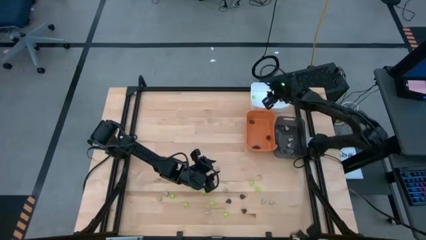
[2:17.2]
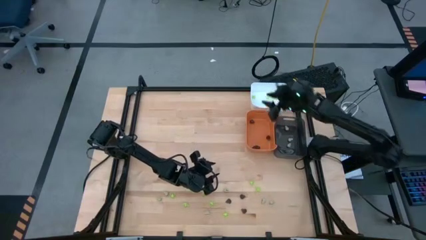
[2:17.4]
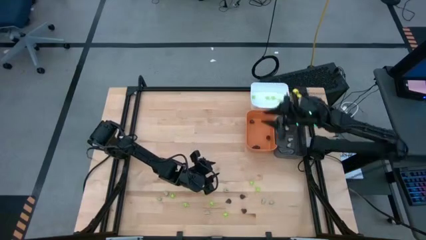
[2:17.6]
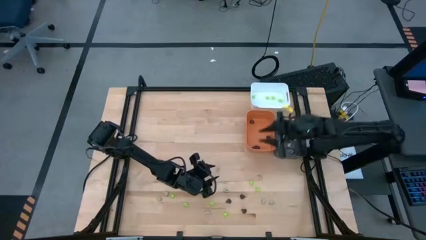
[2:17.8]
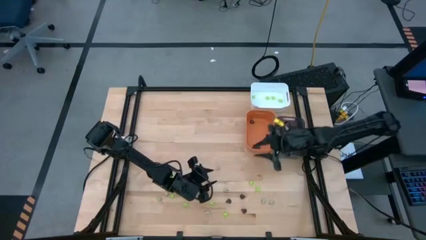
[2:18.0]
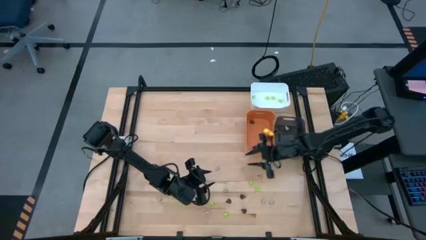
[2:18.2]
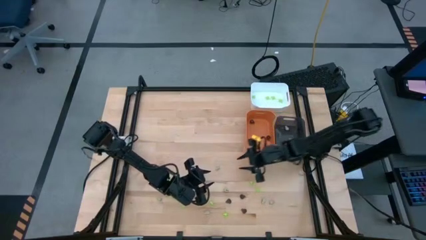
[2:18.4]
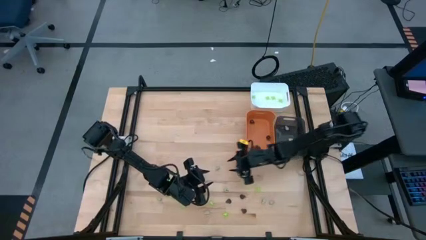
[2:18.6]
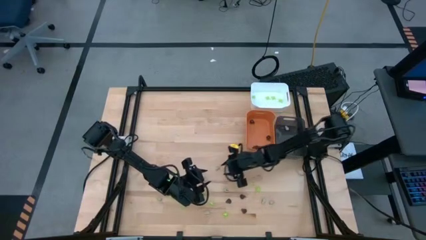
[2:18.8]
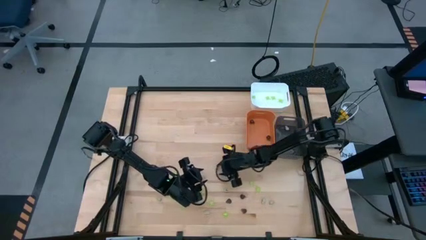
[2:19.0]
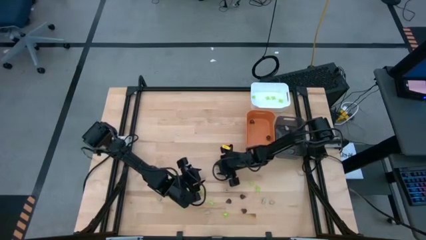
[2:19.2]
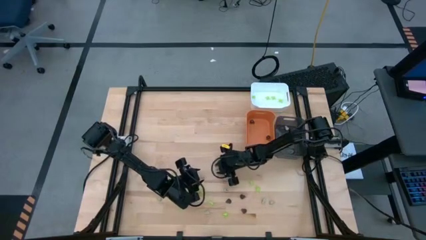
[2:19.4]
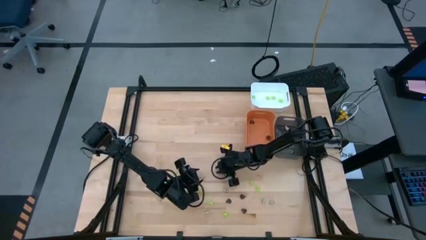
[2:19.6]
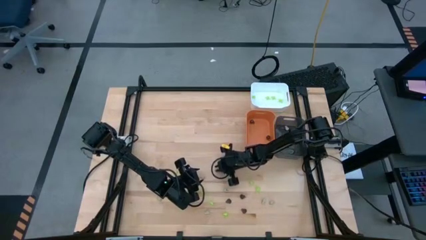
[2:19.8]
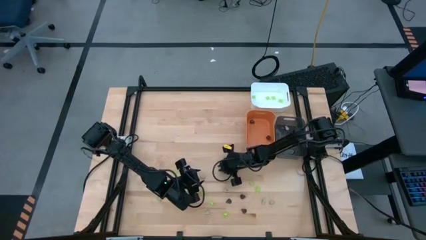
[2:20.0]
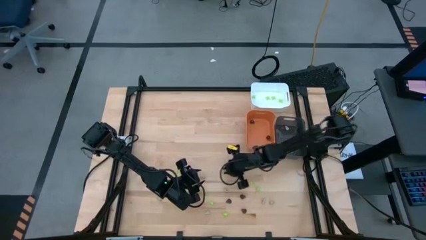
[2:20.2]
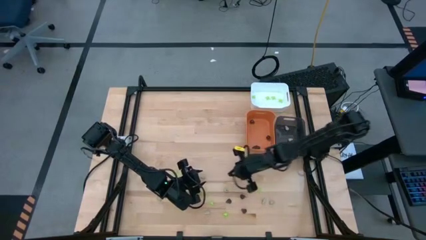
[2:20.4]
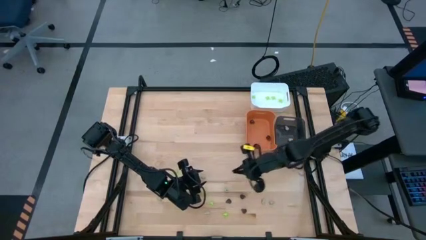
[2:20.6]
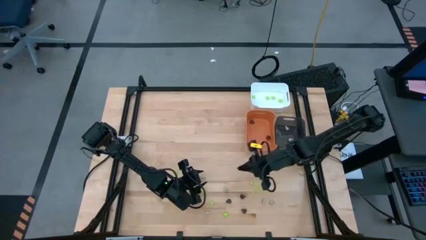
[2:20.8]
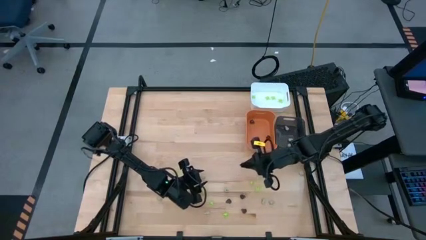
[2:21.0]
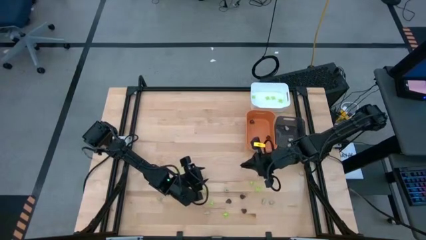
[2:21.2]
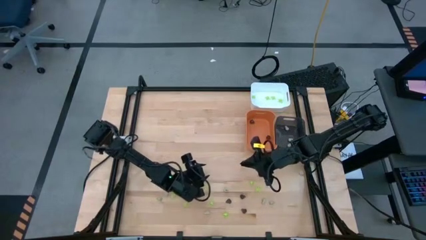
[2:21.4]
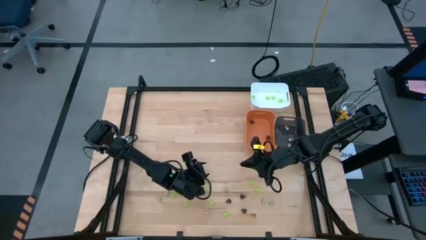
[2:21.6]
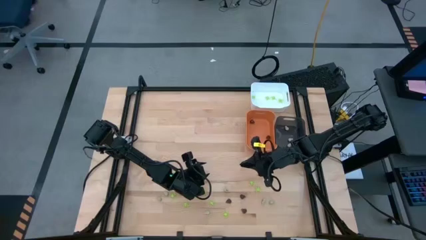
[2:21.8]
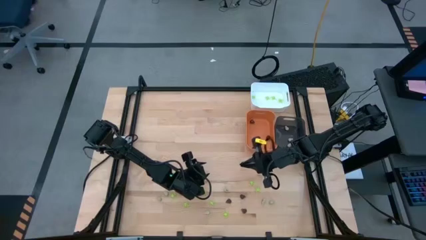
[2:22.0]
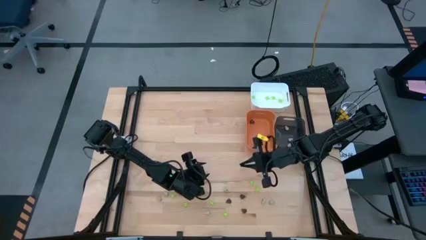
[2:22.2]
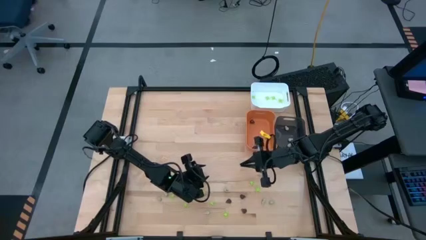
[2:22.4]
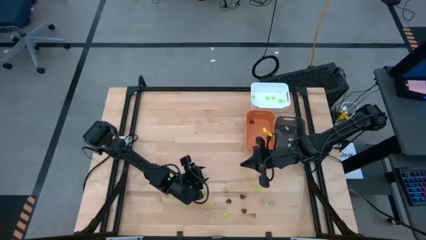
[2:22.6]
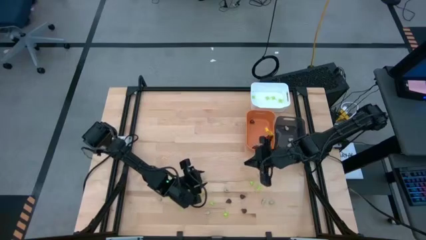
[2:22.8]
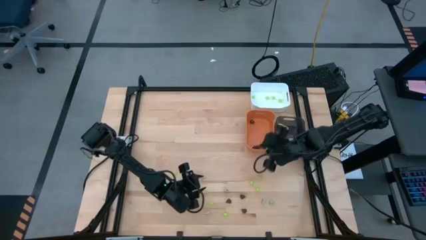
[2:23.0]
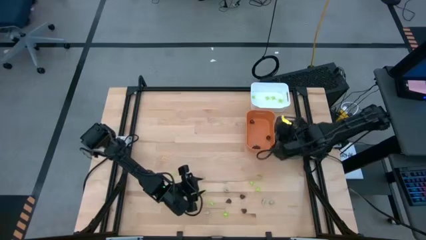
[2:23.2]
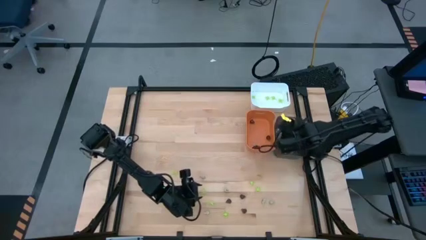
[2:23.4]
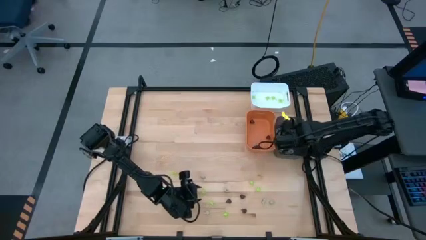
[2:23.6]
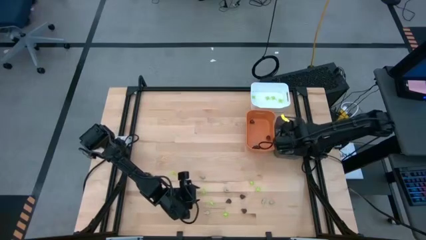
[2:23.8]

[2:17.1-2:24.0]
Task: Sort Halloween decoration
Put the white skull toy into the black bin

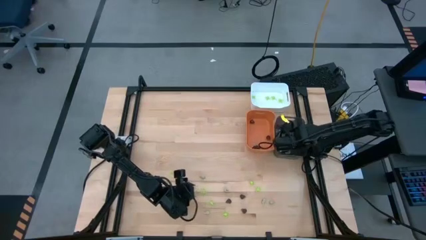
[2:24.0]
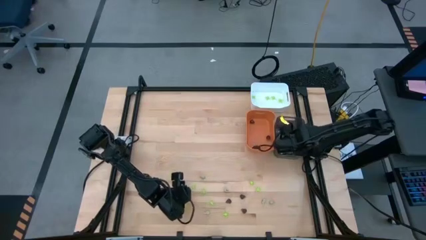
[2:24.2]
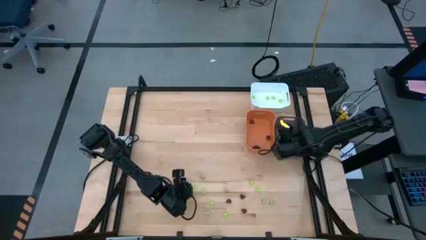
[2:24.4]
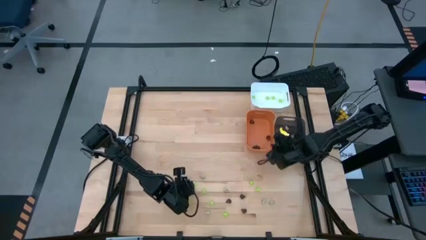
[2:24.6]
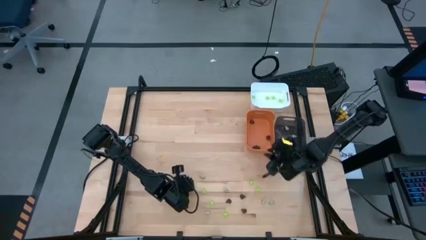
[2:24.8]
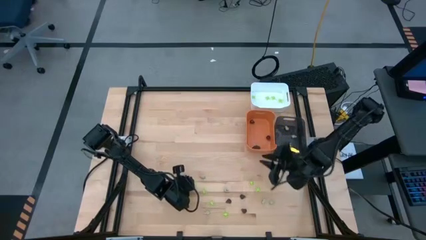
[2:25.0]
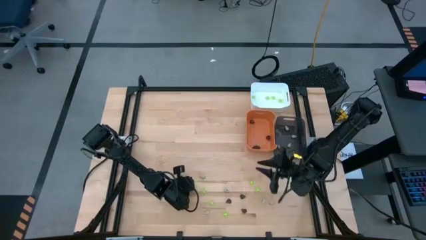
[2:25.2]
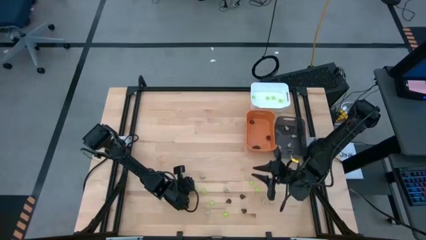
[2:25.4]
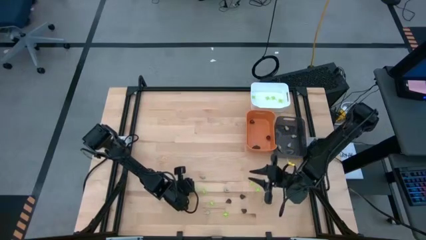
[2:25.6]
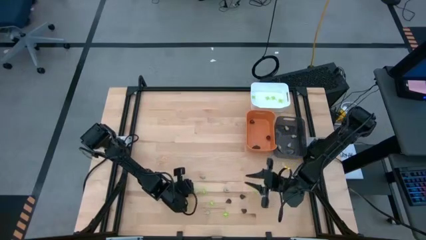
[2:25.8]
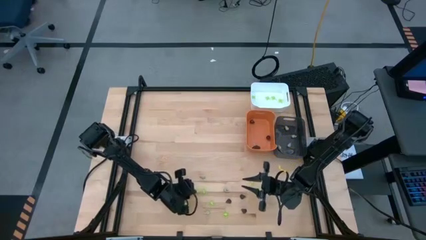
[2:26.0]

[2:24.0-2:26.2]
Put the green spider toy into the white bin

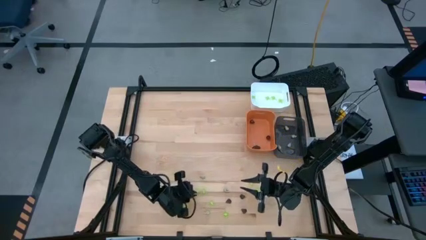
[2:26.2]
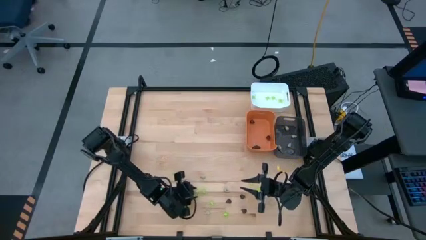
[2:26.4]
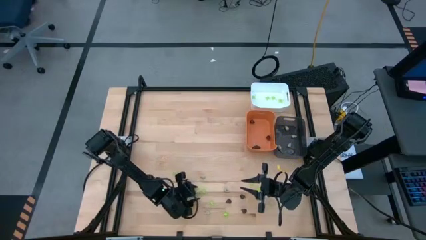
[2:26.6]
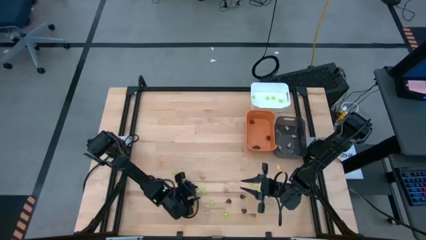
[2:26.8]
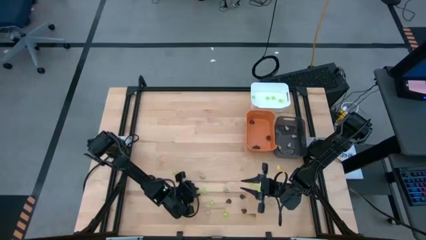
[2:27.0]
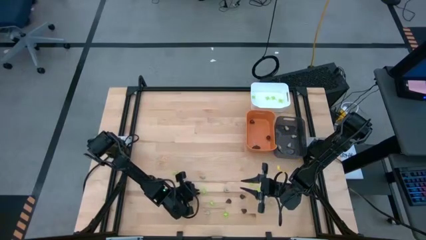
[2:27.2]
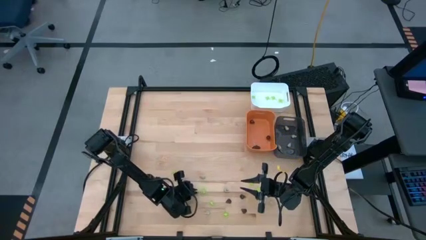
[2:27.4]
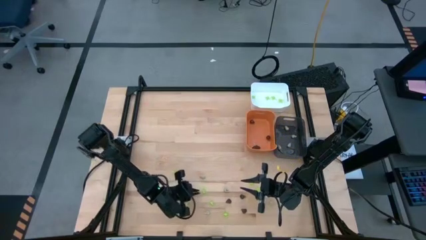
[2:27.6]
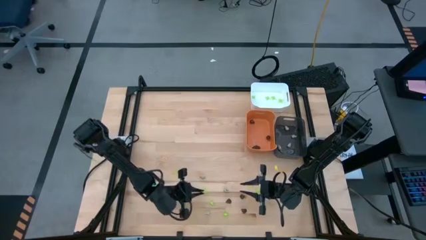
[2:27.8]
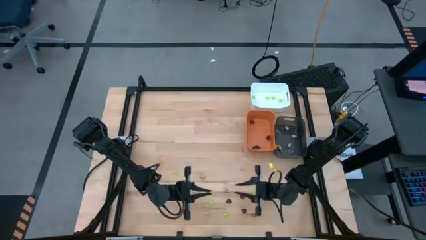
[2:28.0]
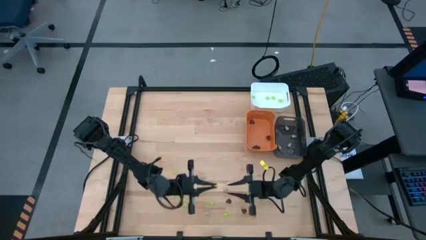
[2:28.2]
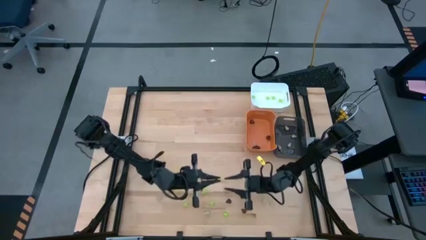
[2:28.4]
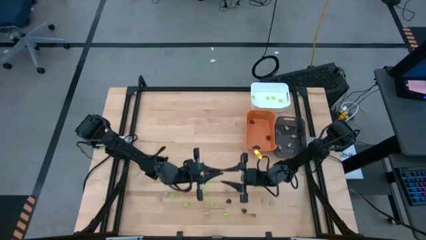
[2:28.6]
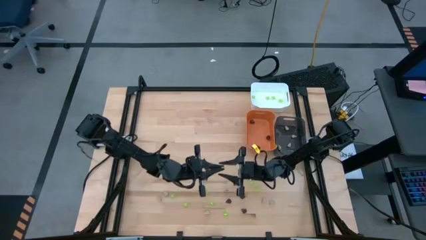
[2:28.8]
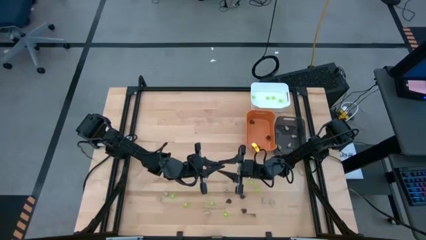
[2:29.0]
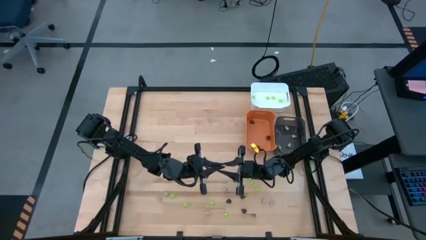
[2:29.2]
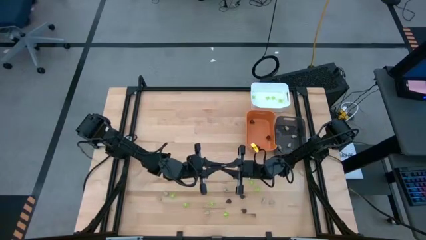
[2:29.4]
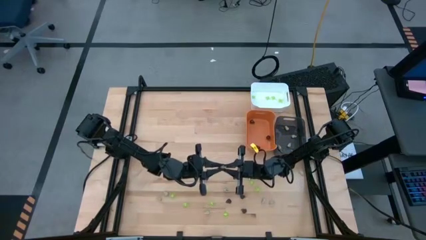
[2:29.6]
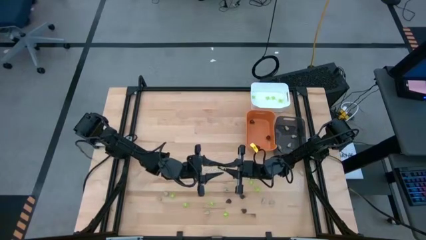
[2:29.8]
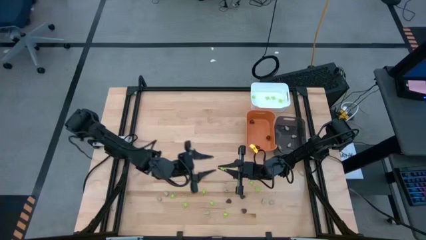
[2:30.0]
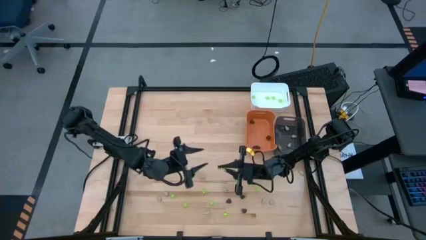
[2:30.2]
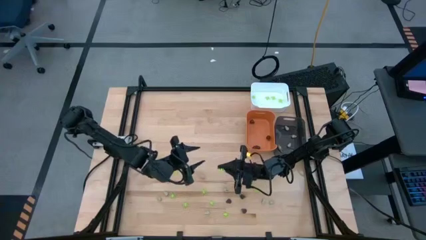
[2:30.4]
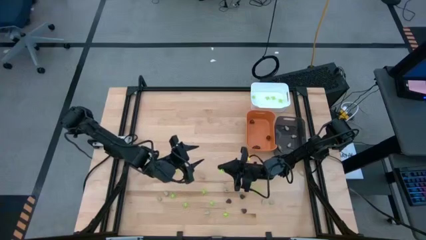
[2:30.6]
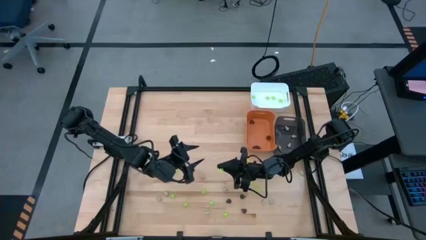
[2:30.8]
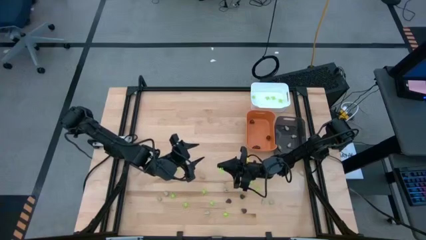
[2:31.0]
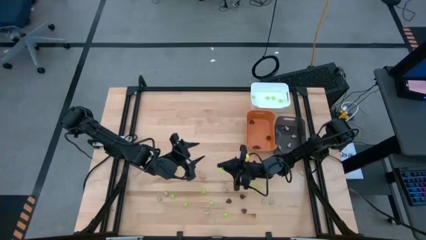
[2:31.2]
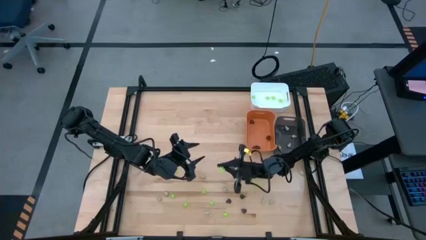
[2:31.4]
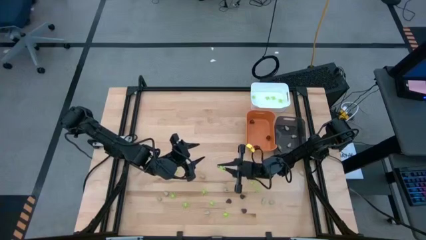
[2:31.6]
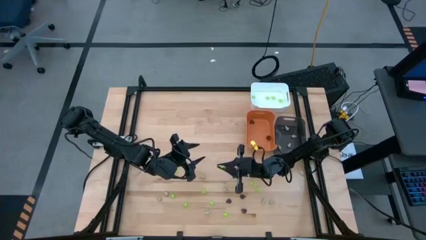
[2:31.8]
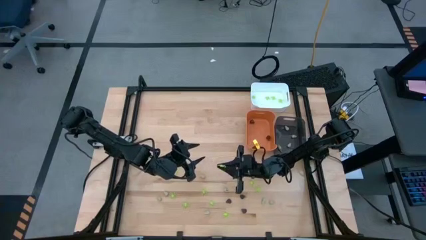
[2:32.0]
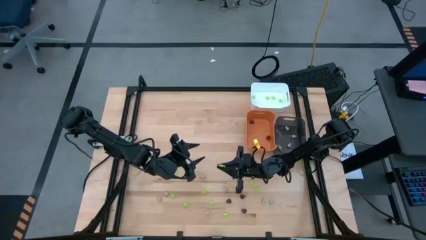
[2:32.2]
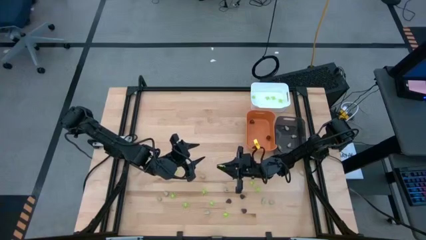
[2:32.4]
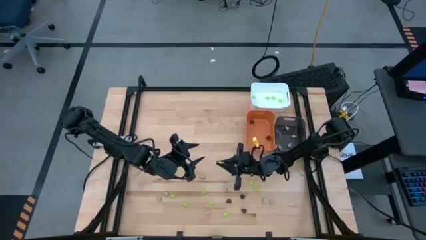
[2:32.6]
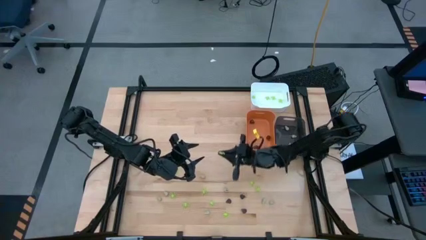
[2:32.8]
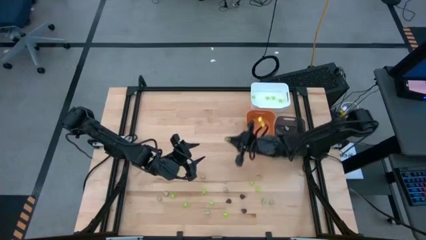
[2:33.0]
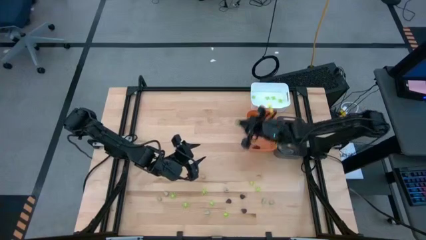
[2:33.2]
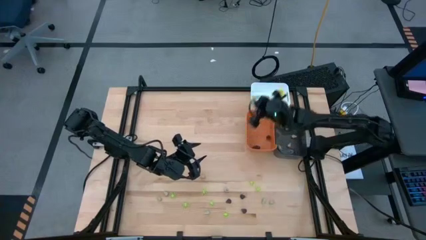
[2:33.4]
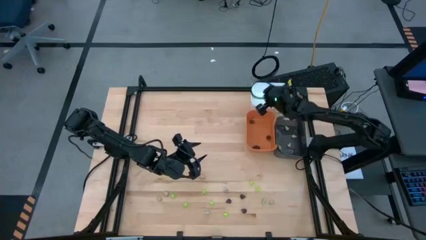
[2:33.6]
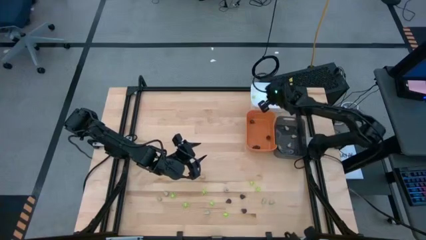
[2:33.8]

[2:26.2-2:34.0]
Put the green spider toy into the white bin
